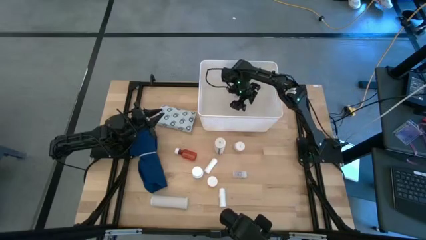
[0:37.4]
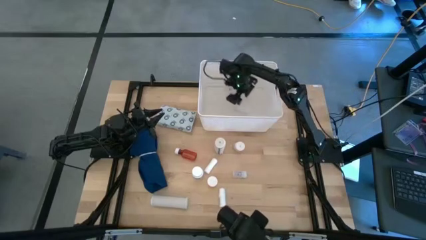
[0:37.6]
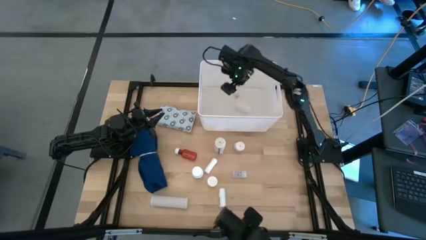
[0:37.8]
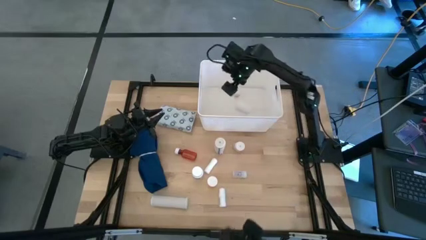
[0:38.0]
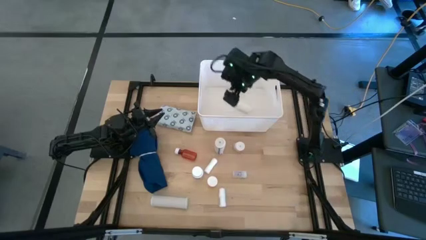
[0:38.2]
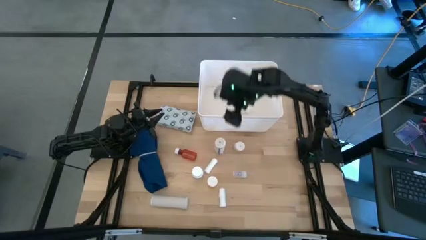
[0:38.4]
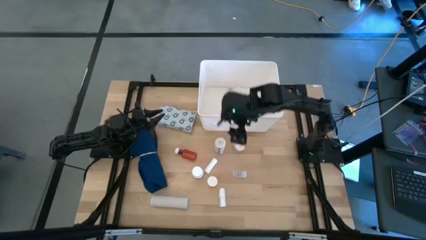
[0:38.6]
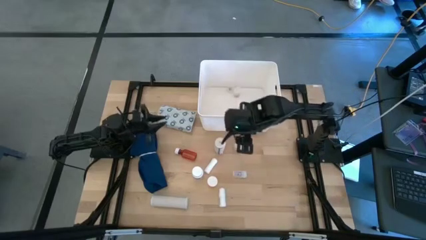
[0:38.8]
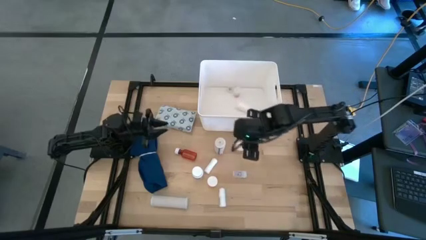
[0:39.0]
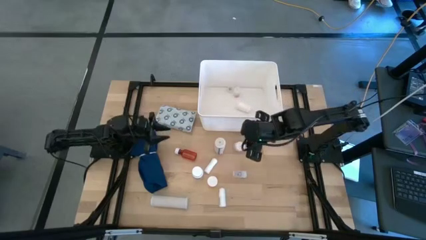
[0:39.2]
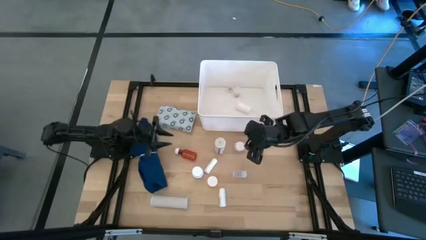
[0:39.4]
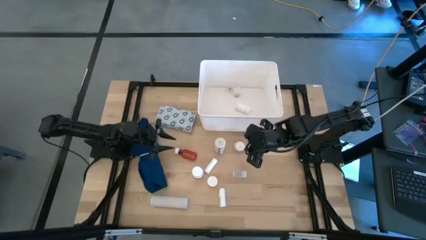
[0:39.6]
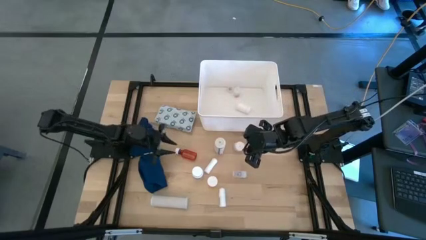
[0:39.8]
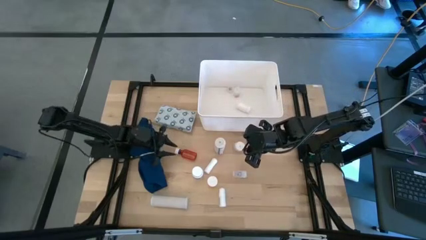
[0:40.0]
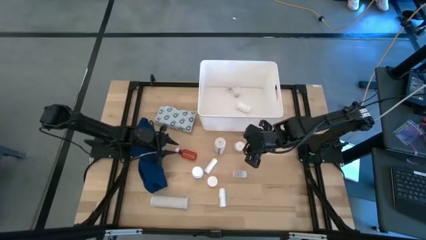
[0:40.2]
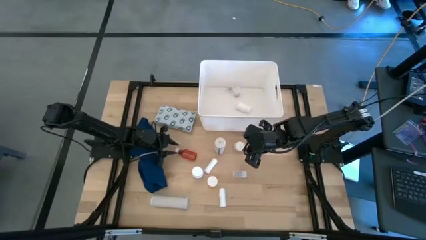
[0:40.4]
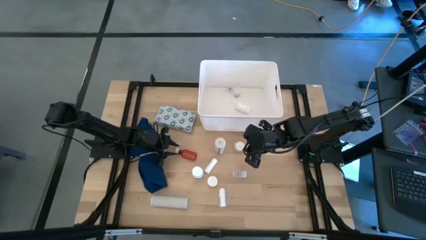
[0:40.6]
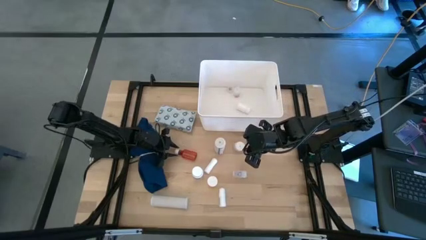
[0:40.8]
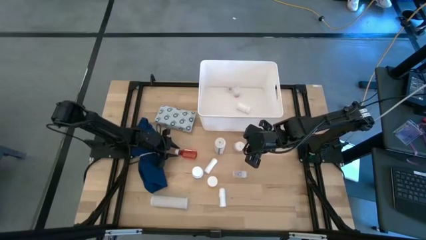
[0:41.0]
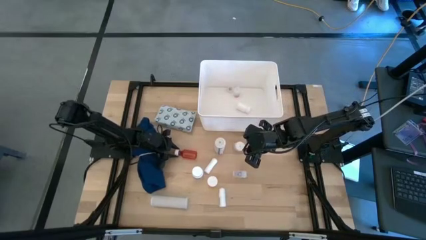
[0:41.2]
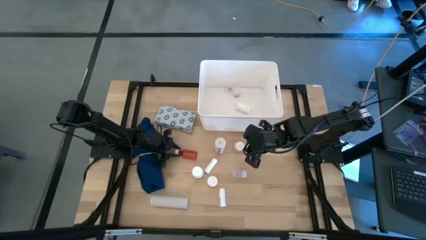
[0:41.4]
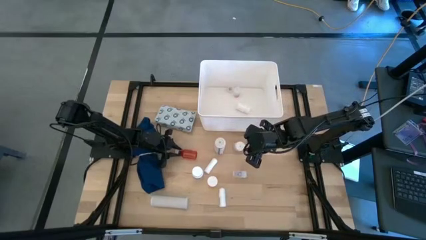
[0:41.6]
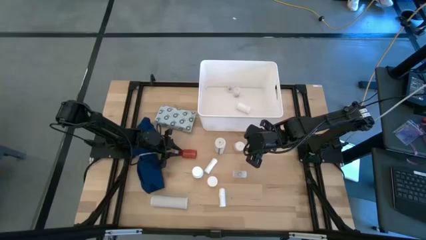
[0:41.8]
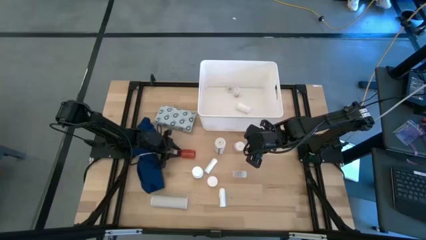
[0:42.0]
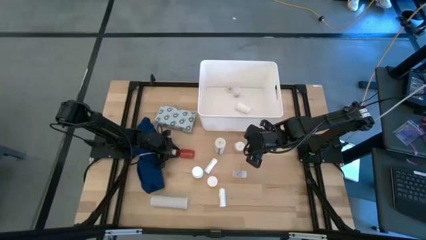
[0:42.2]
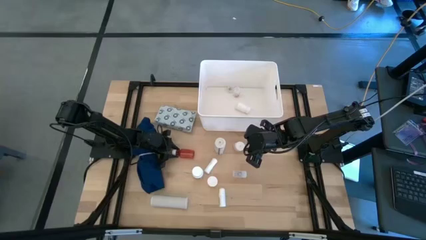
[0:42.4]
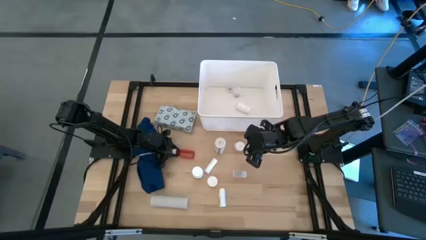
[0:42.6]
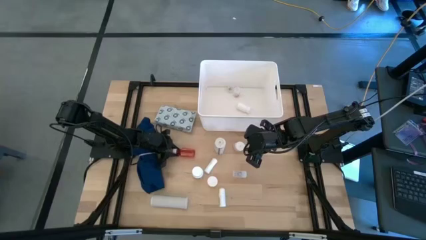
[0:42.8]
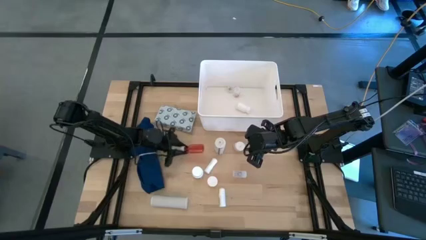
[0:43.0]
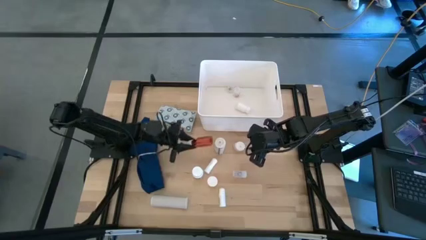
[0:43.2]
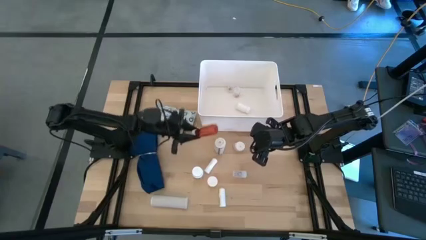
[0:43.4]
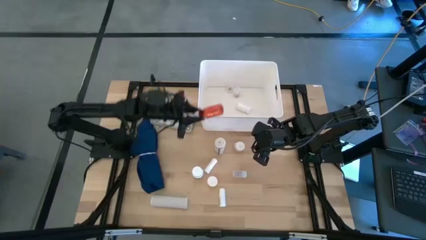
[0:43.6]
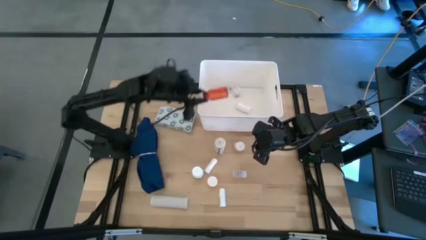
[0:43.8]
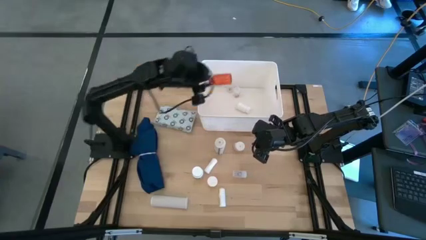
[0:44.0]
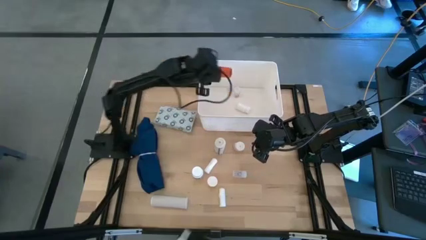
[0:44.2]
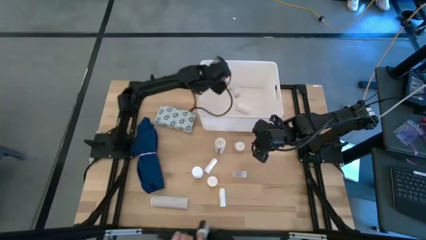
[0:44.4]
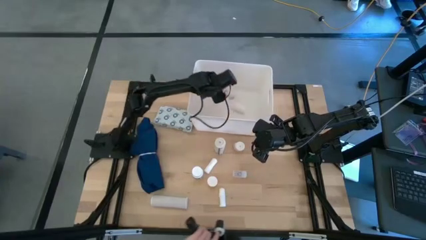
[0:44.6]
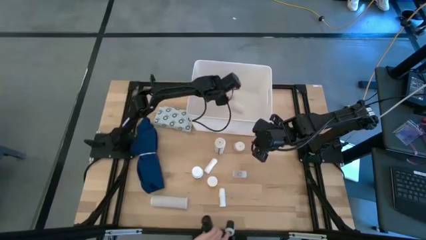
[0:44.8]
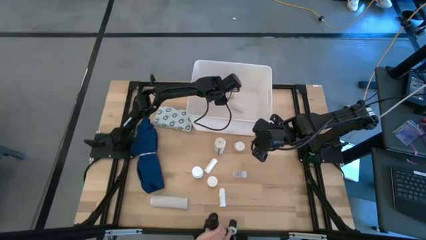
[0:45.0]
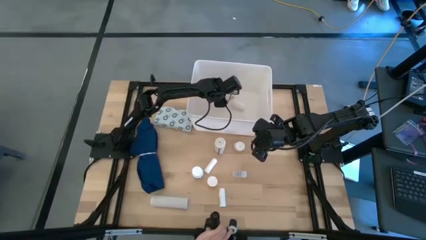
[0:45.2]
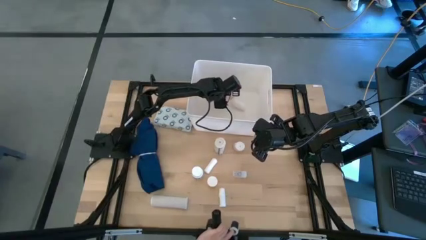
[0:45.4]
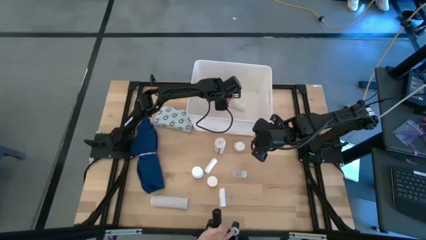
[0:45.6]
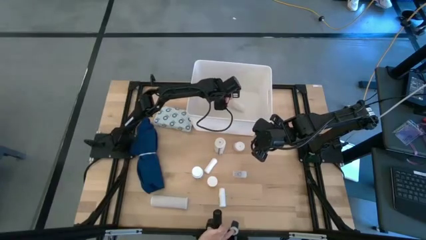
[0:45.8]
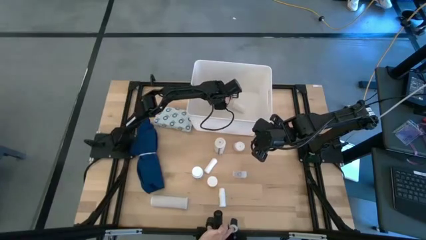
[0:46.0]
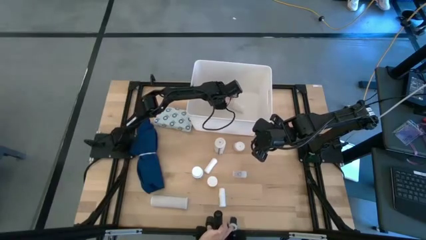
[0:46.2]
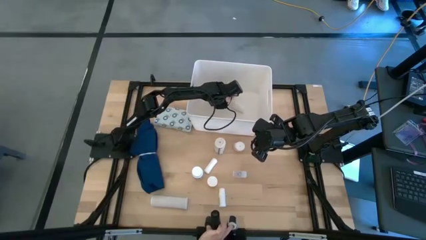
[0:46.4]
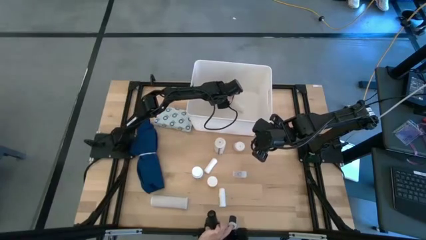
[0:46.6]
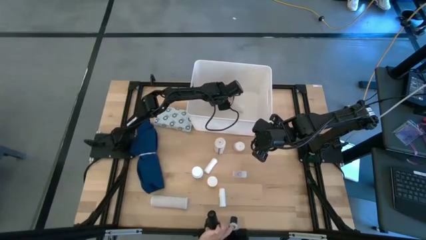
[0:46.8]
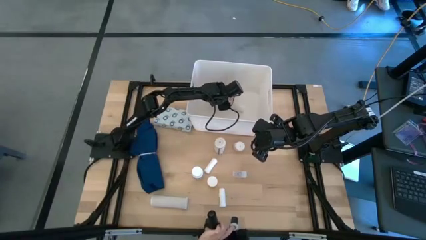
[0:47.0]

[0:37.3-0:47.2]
Task: Pick & place medical supplies in basket/bin
Put the brown pill bottle in the white bin

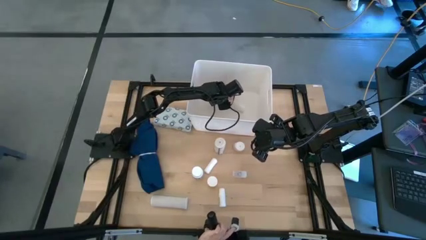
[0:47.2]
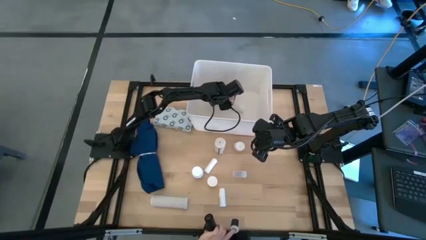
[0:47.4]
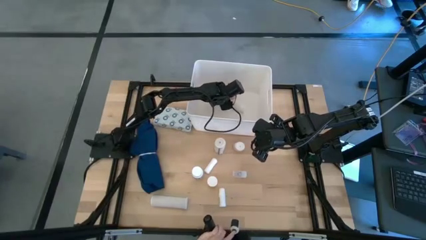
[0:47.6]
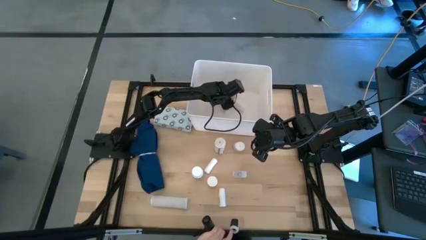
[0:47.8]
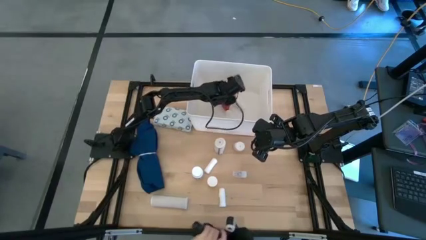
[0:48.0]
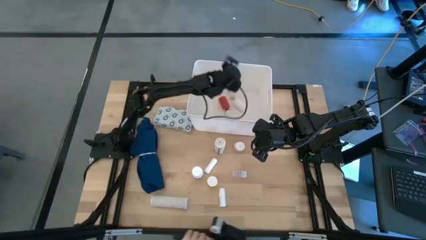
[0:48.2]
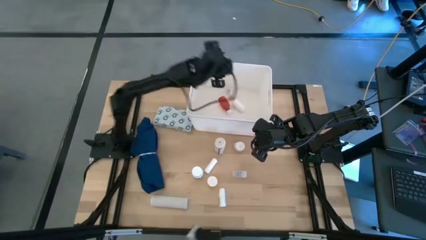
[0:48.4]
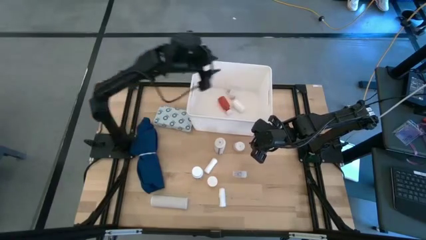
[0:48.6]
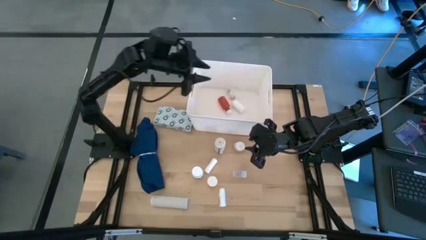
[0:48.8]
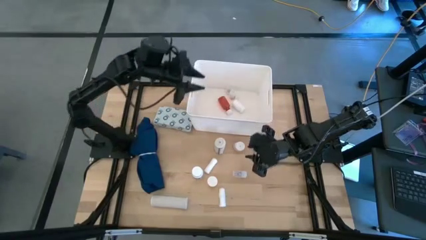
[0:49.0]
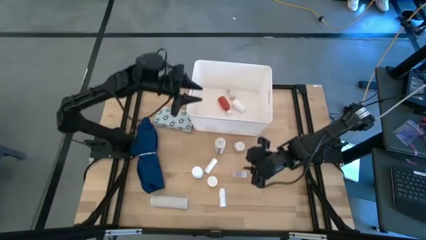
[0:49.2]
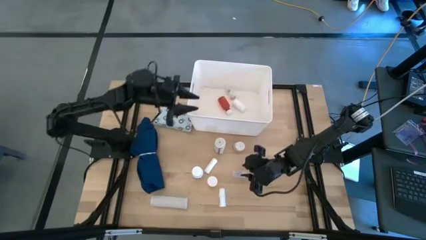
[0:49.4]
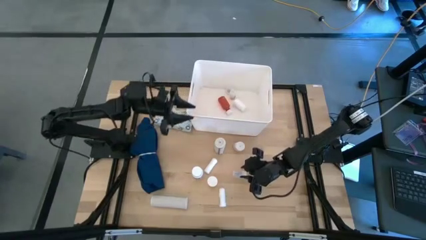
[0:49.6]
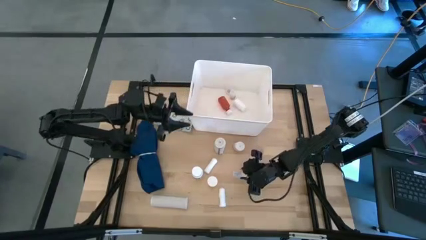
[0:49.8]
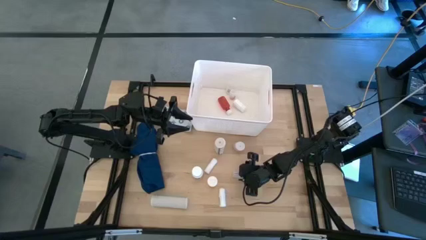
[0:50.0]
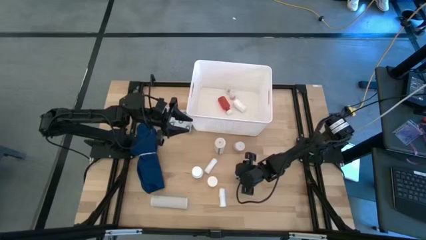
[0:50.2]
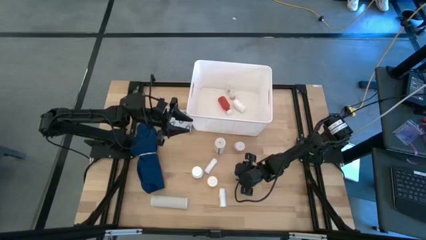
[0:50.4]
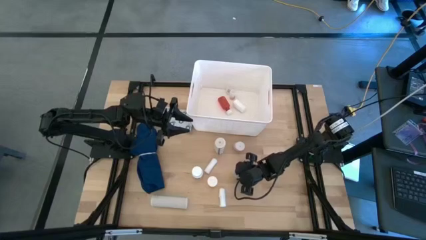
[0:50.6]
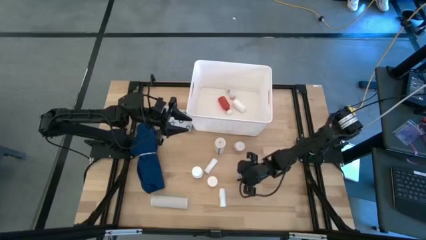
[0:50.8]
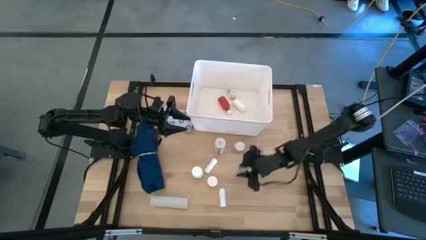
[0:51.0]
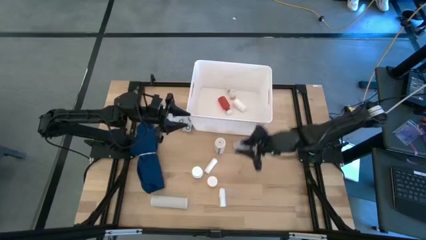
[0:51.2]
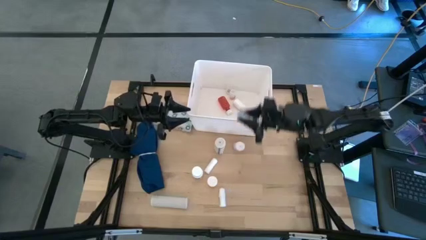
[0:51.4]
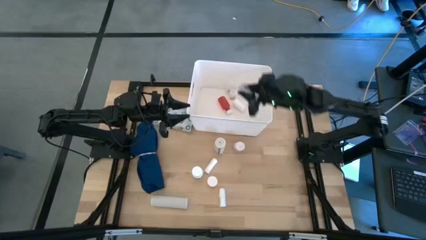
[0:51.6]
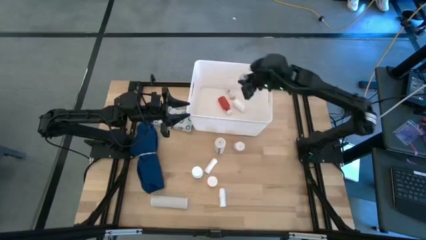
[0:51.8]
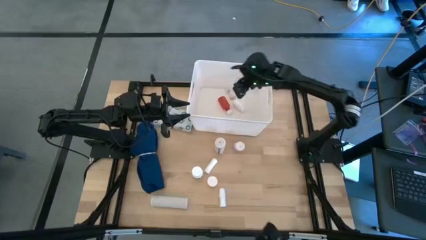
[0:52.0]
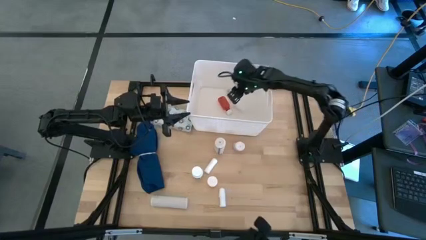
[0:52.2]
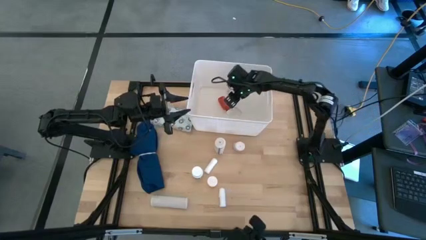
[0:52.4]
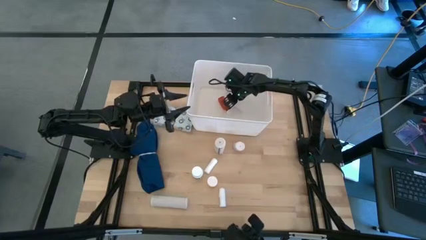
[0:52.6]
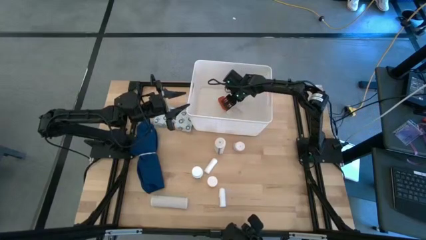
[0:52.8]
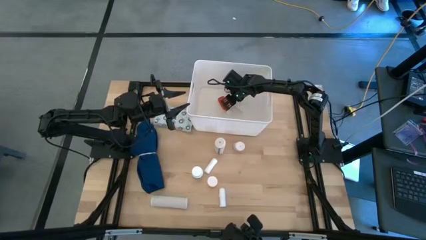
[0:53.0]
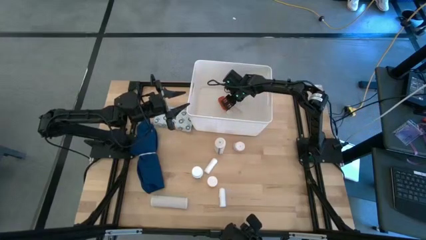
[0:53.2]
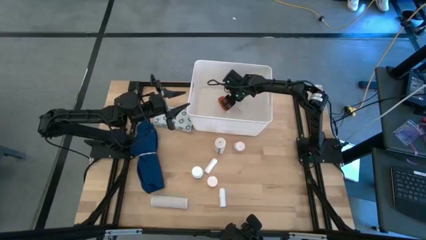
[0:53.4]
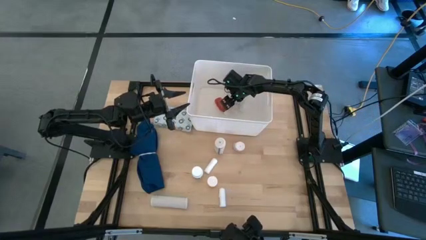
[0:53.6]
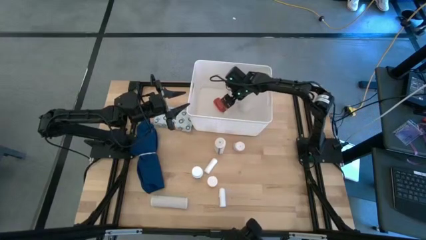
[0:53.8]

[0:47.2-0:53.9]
Put the transparent pill bottle in the white bin
